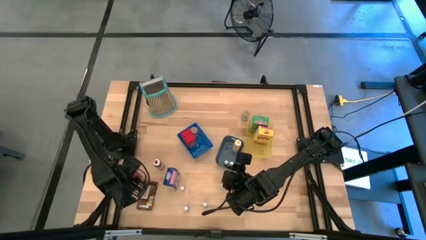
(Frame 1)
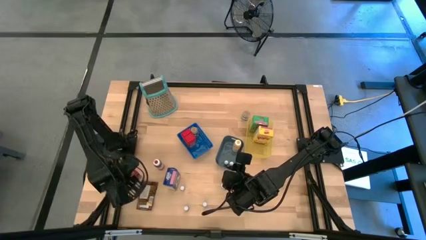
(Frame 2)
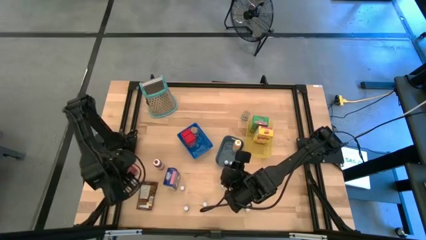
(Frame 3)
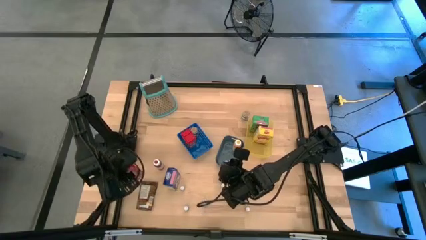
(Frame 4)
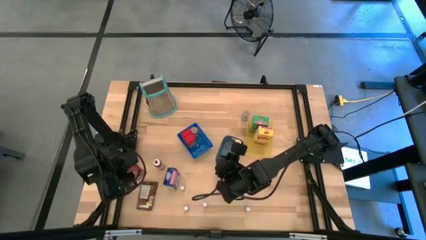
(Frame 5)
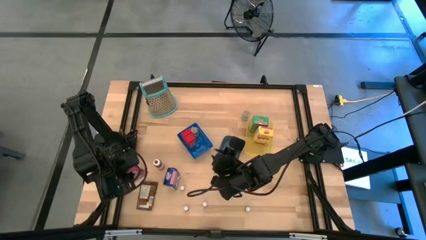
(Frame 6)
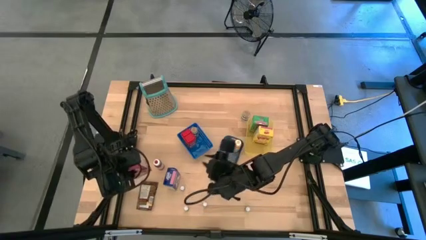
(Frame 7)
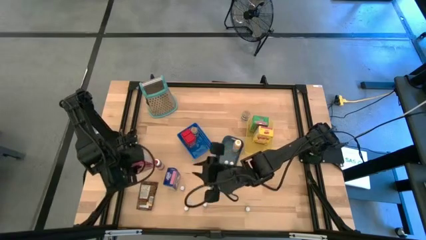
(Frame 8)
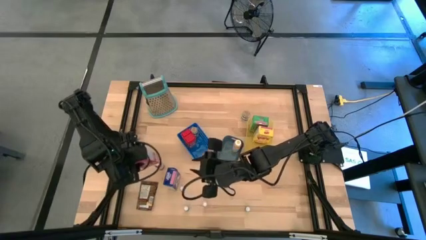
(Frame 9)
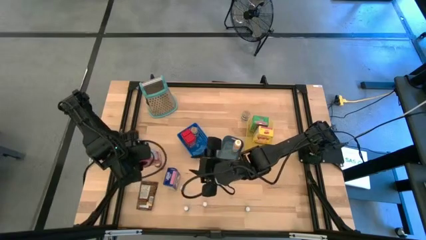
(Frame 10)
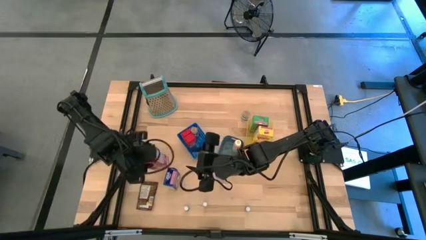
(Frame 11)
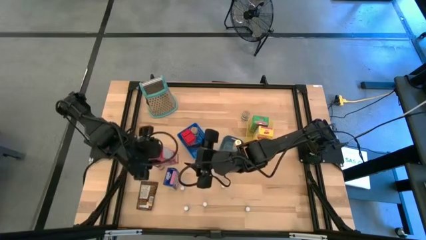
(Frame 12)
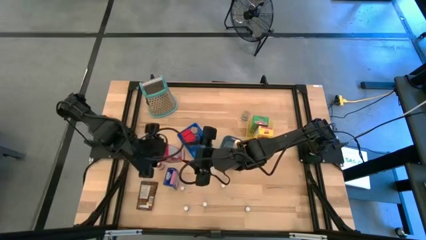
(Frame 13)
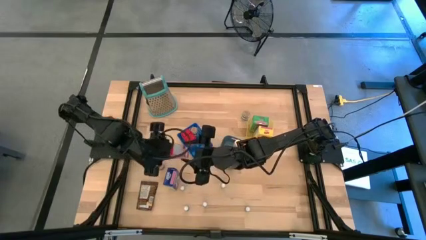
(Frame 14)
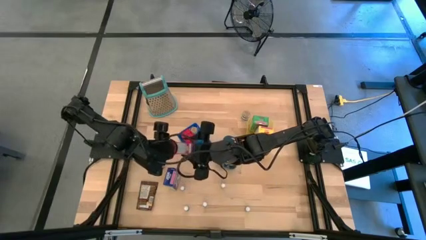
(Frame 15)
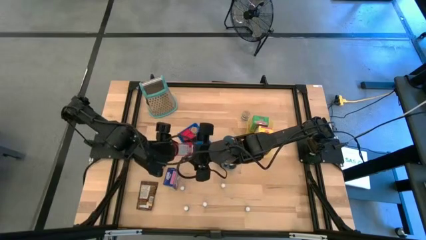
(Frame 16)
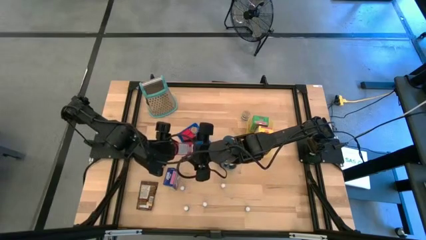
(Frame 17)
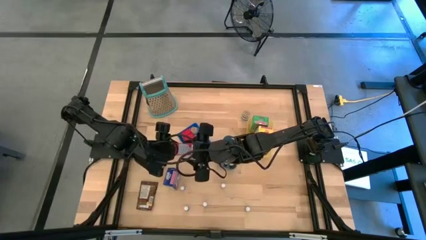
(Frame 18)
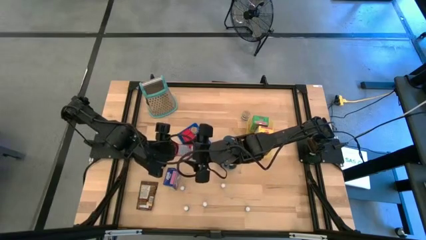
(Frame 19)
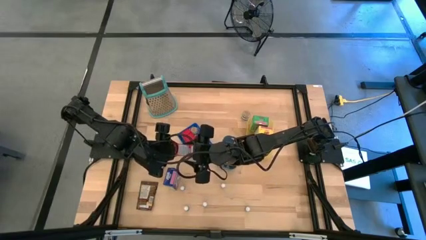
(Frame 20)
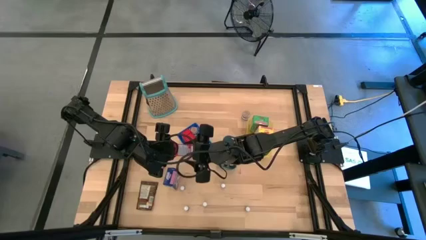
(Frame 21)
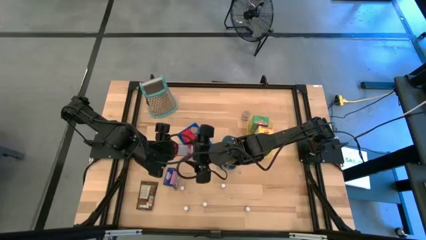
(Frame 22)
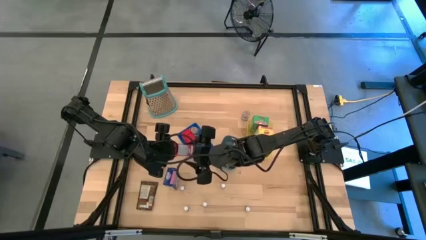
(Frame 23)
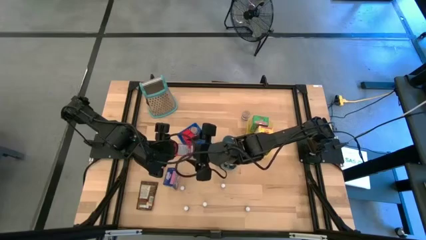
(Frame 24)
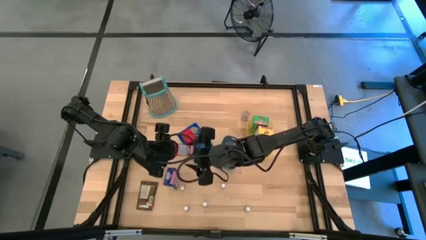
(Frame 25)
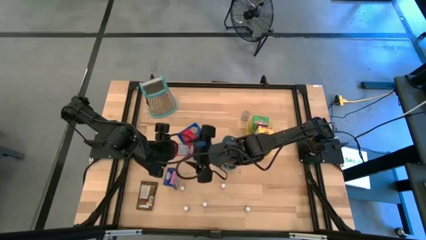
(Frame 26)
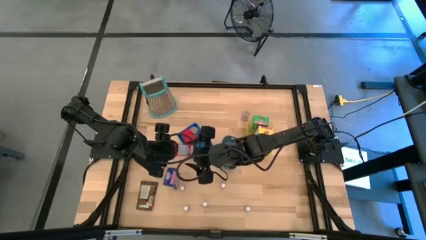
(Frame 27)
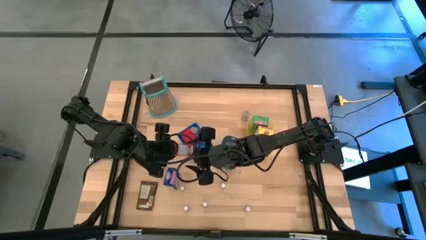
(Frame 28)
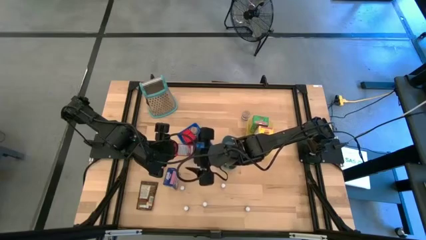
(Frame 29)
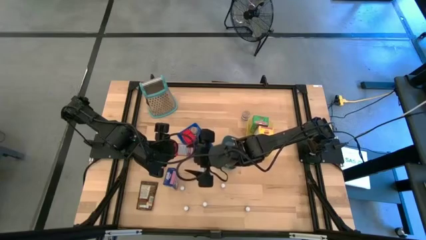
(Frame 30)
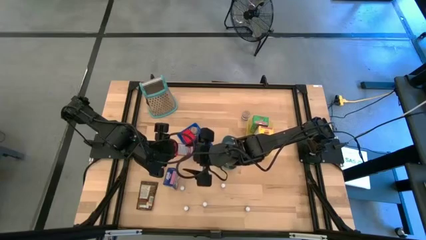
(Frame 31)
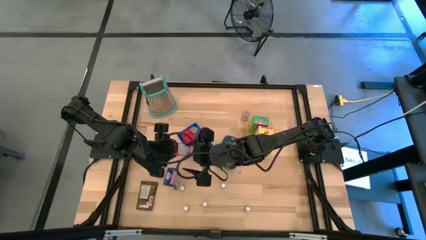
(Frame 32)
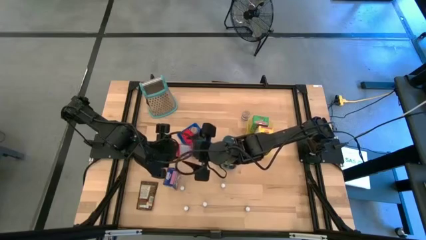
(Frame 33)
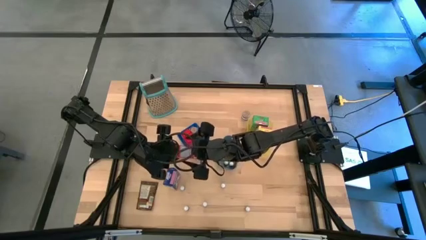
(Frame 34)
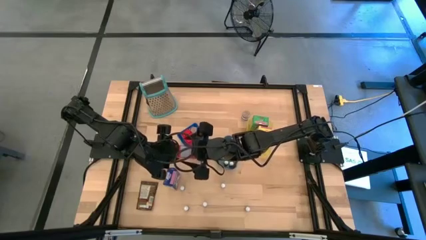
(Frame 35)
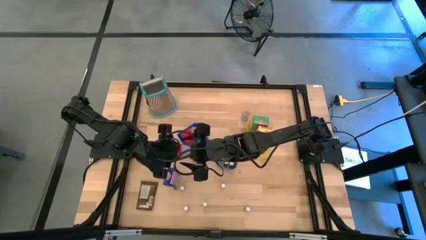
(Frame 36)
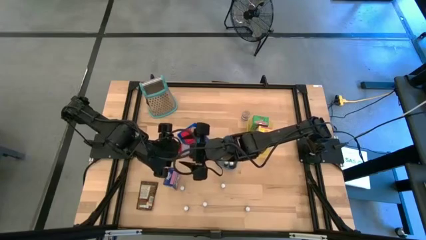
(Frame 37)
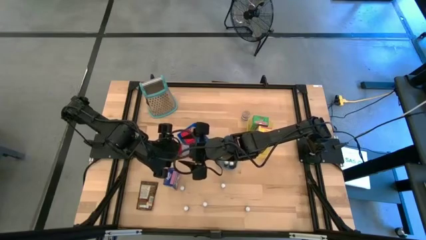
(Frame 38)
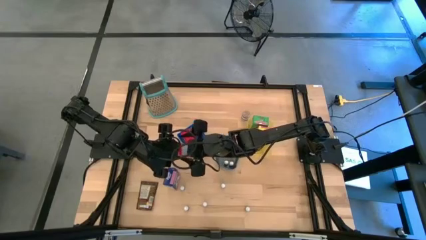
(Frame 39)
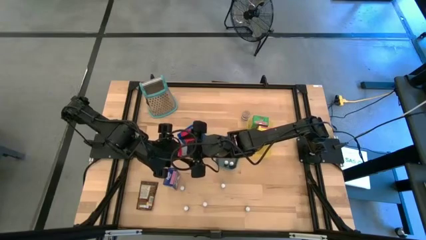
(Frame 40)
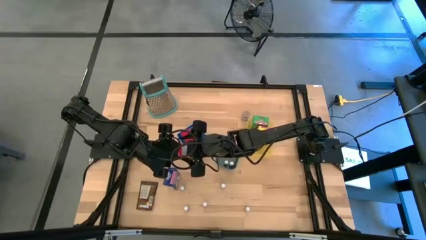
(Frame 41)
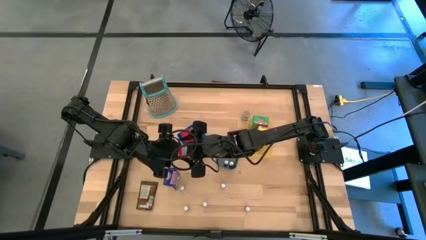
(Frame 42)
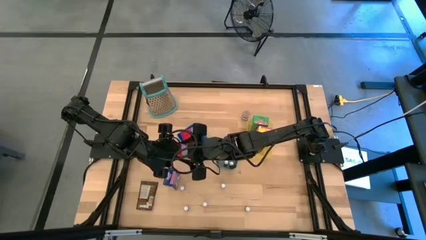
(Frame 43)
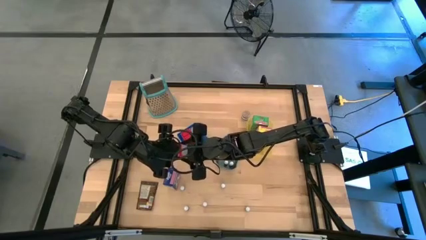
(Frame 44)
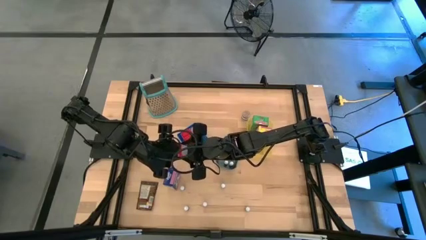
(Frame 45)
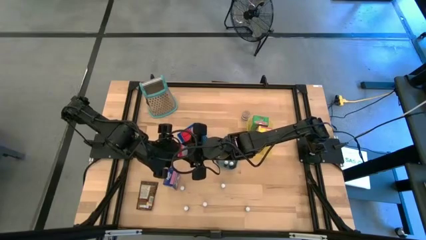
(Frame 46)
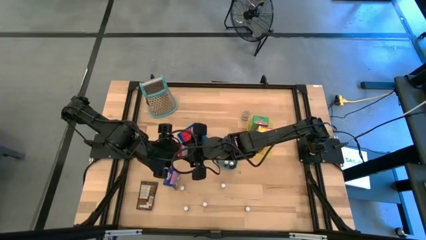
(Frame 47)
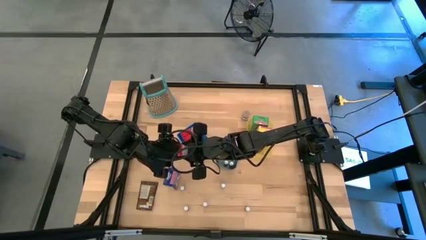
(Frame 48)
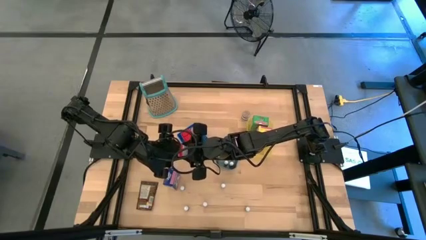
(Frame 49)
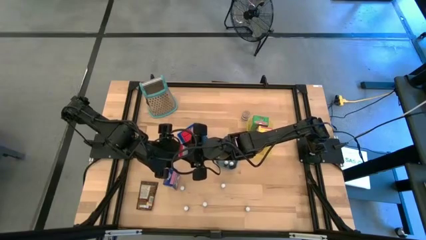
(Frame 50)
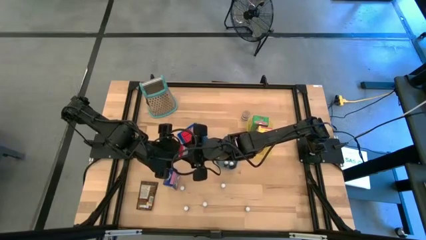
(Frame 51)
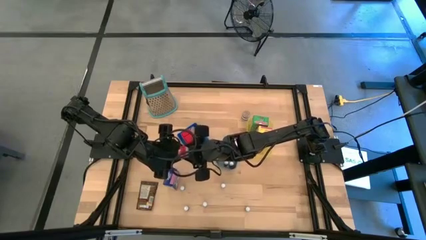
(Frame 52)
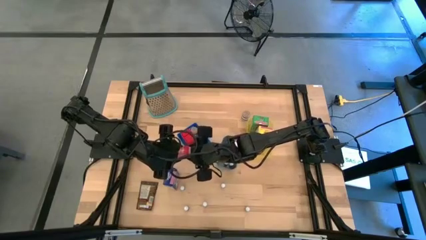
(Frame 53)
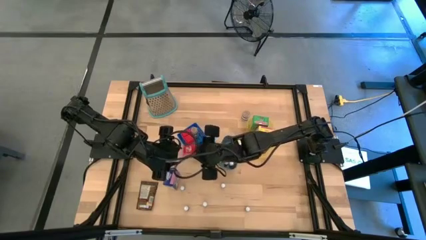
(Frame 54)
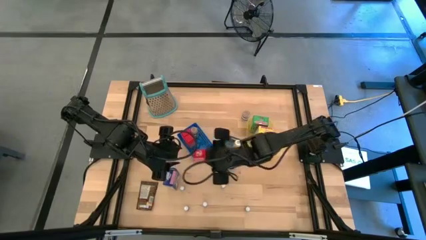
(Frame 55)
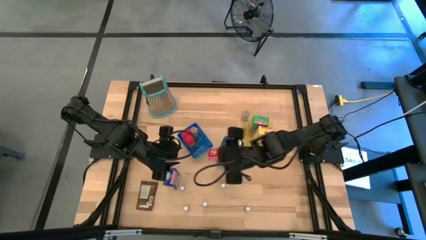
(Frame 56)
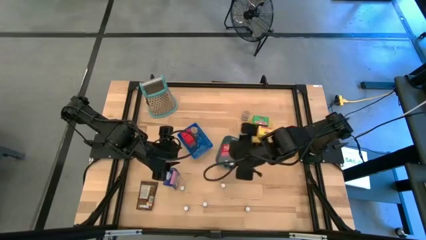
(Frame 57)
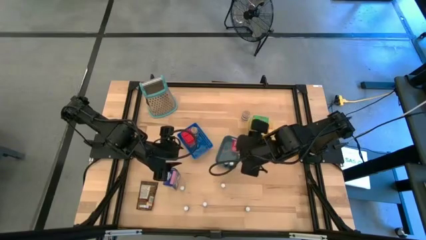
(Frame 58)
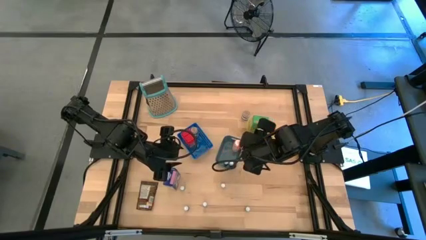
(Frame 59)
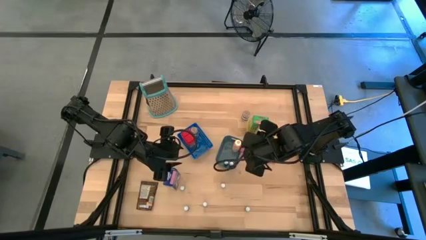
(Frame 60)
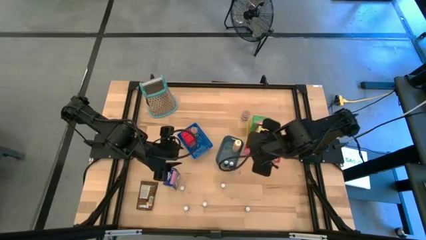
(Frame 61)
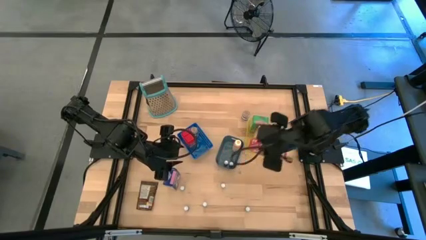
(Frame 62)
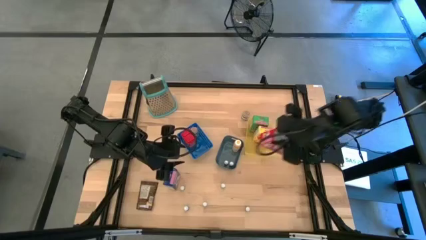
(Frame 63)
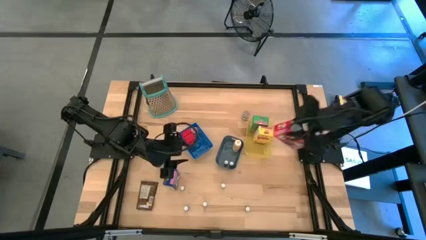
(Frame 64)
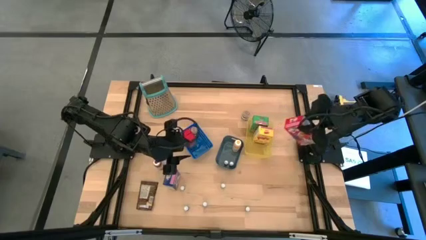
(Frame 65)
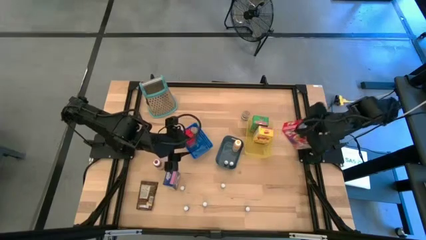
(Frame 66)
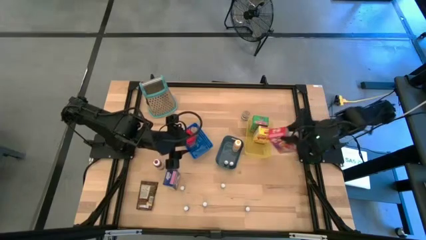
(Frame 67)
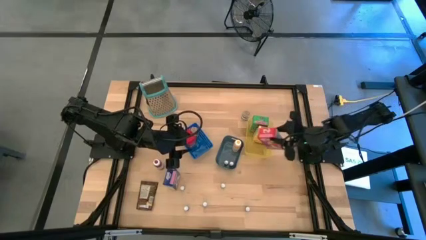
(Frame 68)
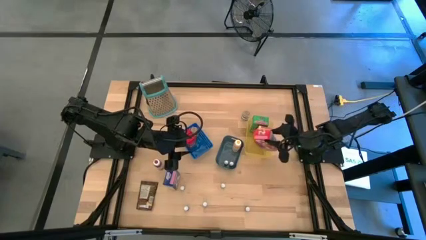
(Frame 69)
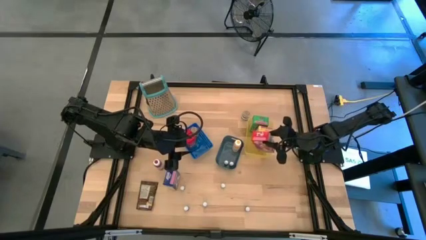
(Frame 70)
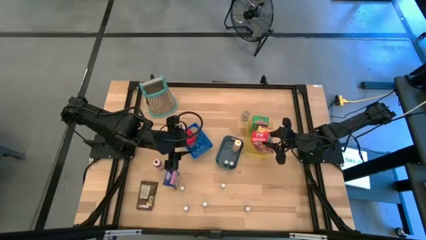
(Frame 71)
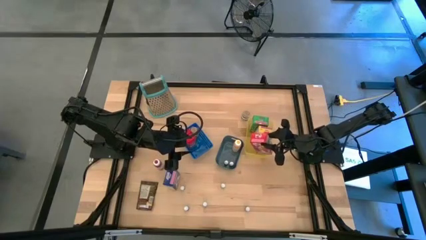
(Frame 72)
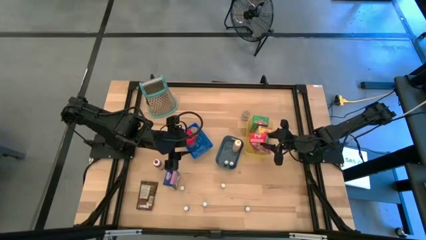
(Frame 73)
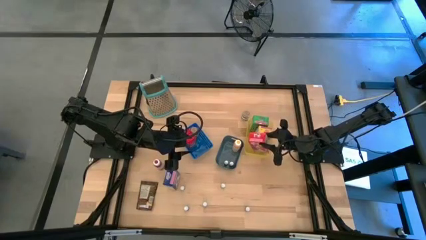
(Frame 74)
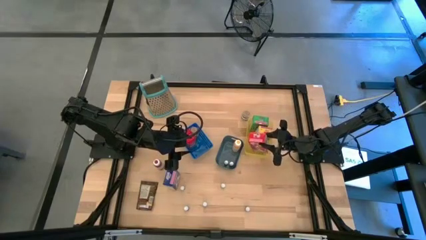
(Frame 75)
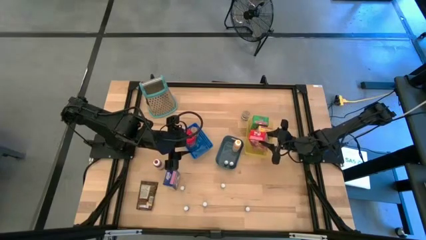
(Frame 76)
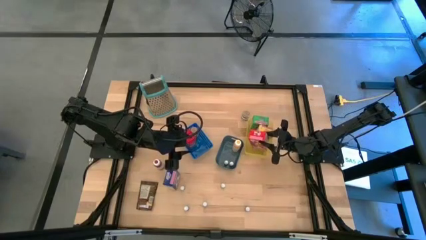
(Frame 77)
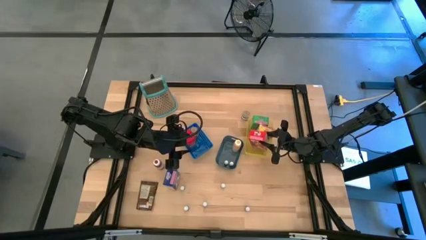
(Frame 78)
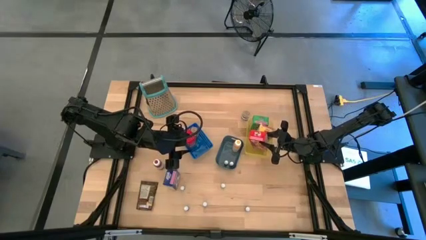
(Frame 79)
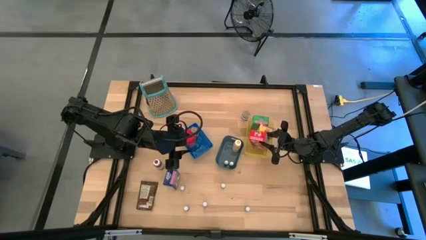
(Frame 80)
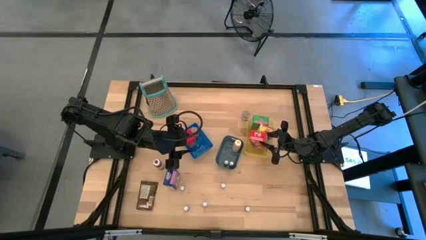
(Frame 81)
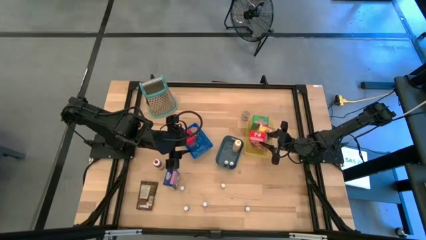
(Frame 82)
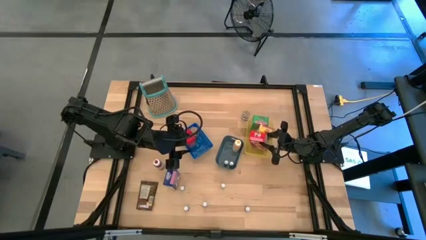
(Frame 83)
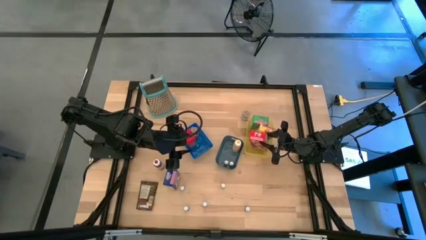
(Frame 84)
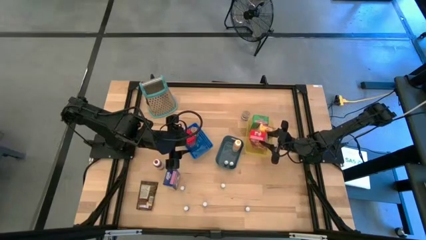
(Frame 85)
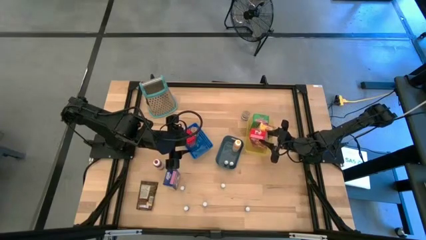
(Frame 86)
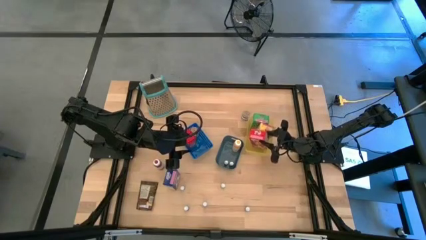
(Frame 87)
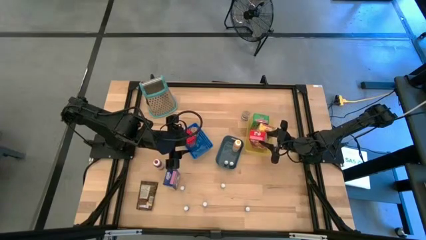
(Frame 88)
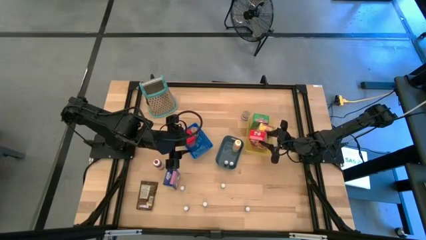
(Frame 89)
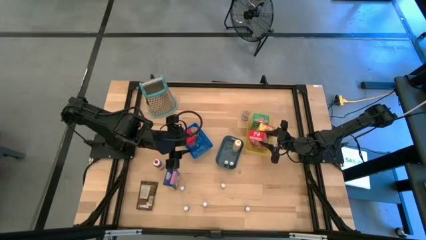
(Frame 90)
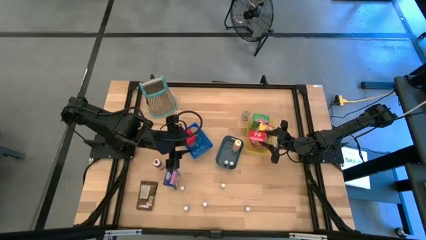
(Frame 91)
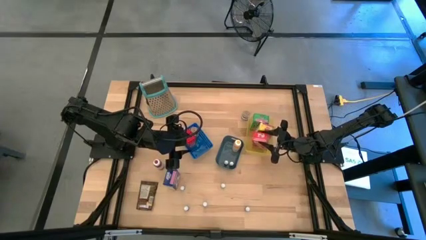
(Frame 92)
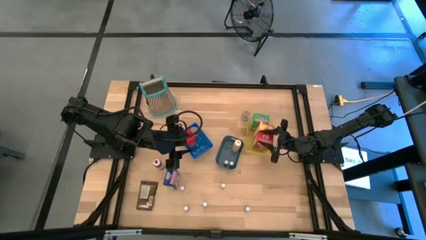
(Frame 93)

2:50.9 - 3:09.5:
Task: Pick & Place Kitchen Items
Put the red cereal box into the yellow bin
